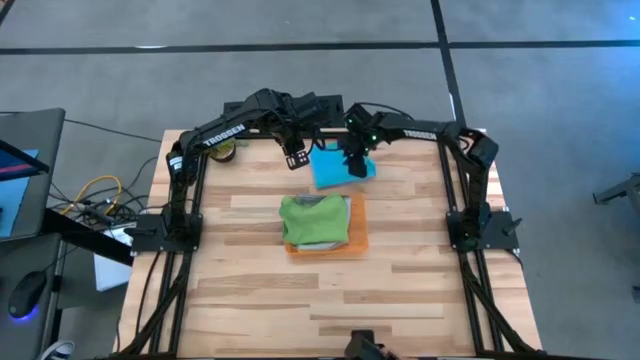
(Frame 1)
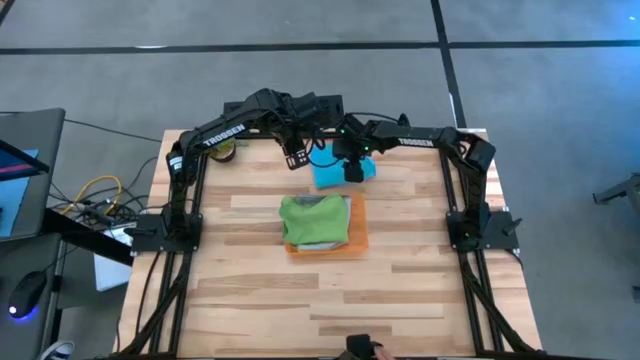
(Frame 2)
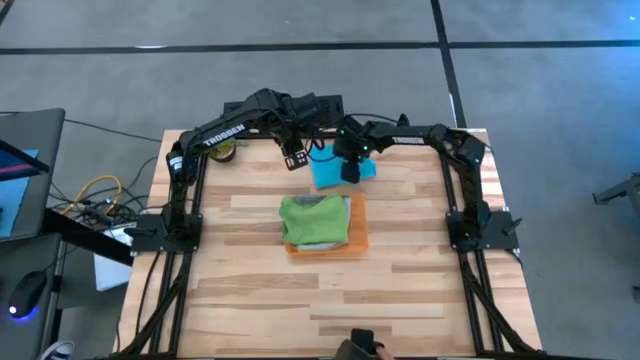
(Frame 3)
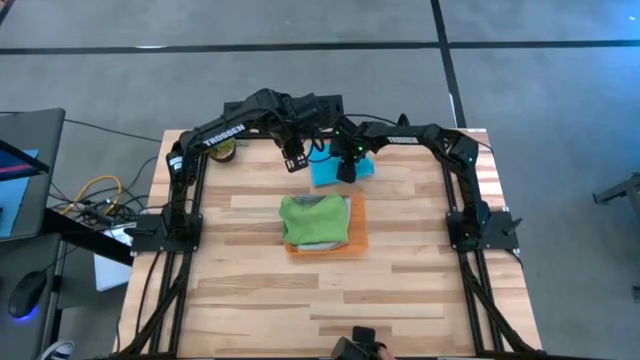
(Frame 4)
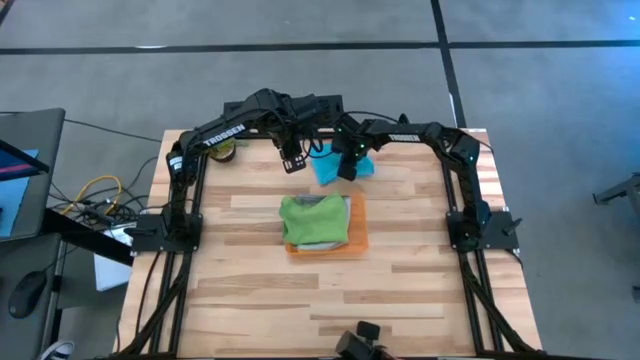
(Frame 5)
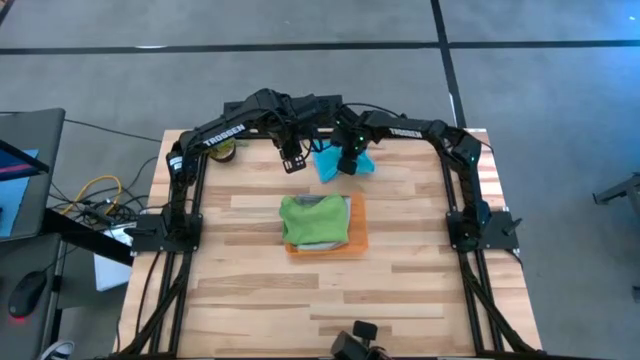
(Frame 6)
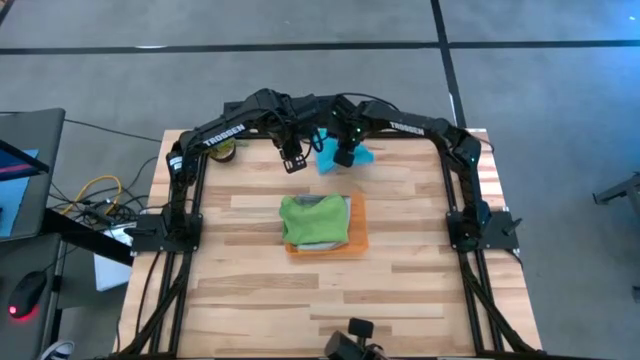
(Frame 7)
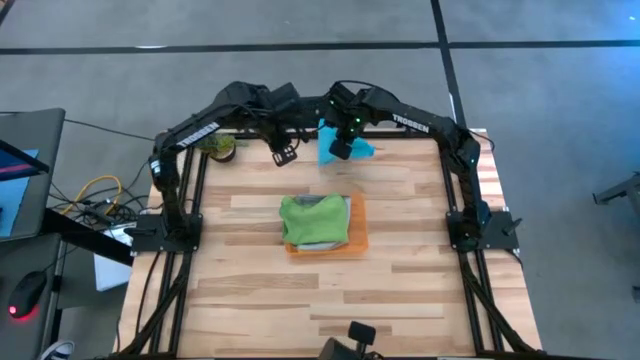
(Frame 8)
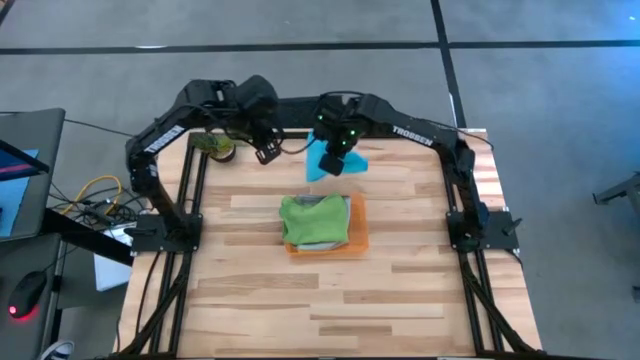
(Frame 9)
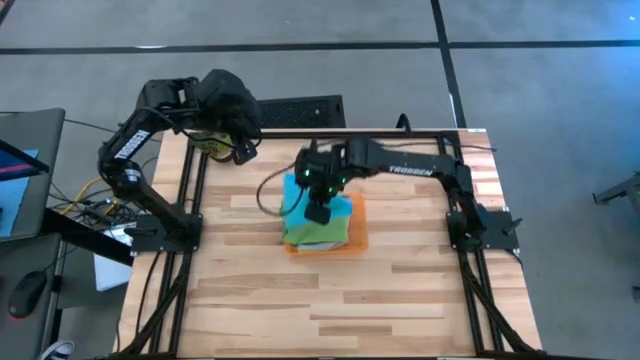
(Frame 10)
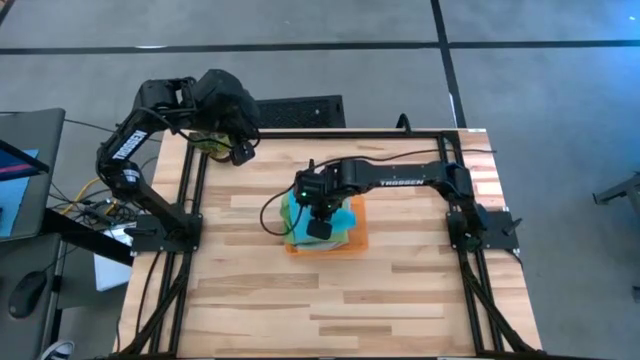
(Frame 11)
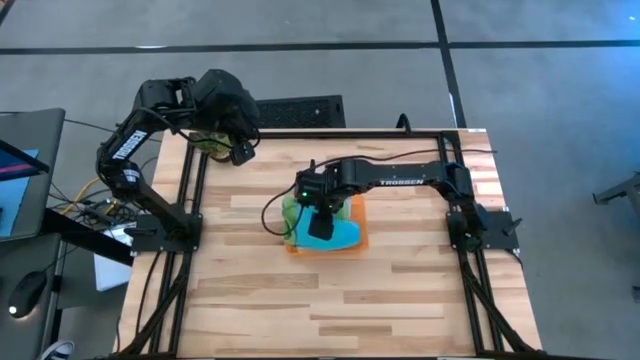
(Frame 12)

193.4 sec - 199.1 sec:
Task: Sort microfiber towel by color & place in baskets
Stack the blue towel on top of the green towel into the orange bin

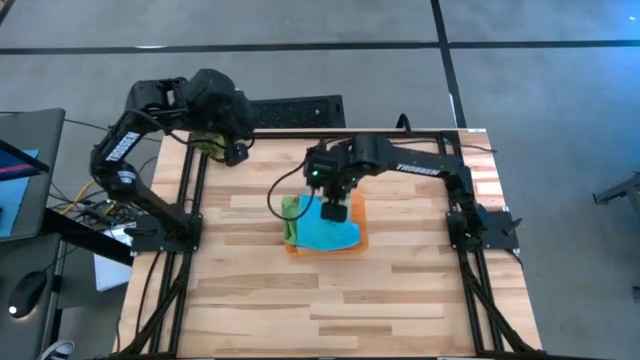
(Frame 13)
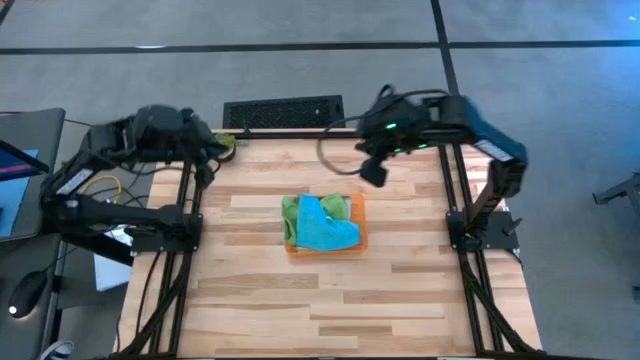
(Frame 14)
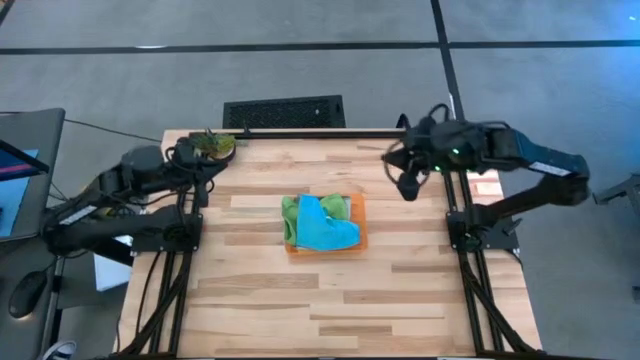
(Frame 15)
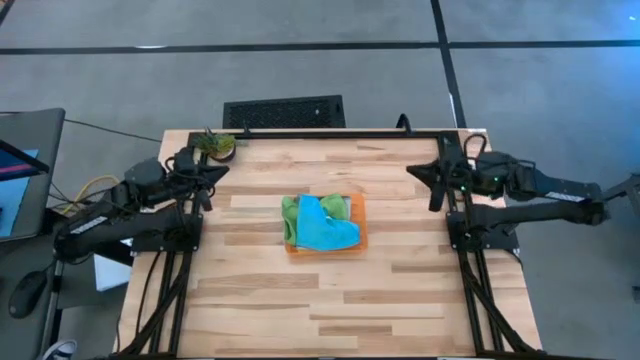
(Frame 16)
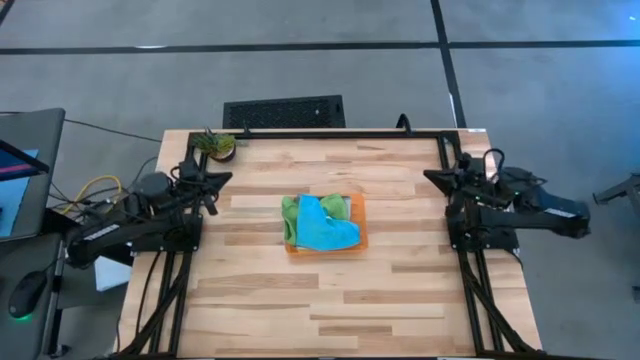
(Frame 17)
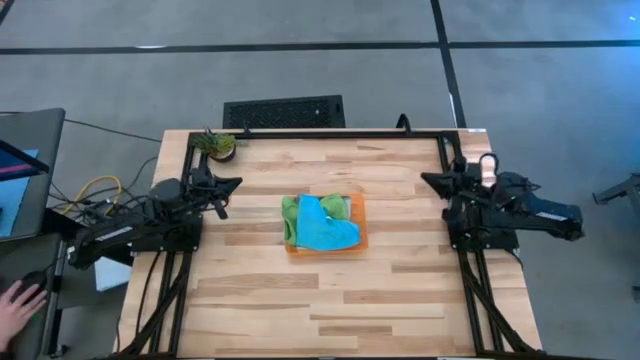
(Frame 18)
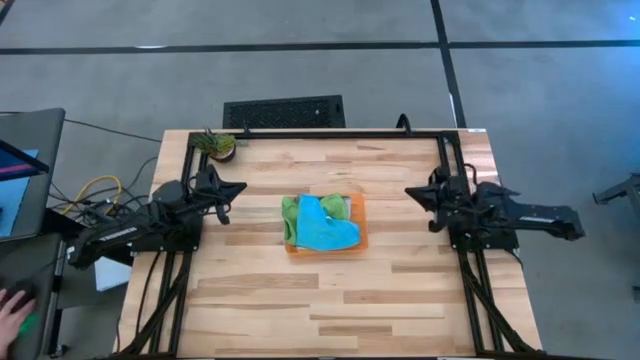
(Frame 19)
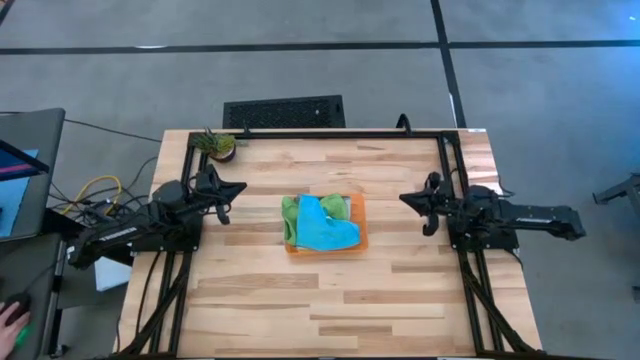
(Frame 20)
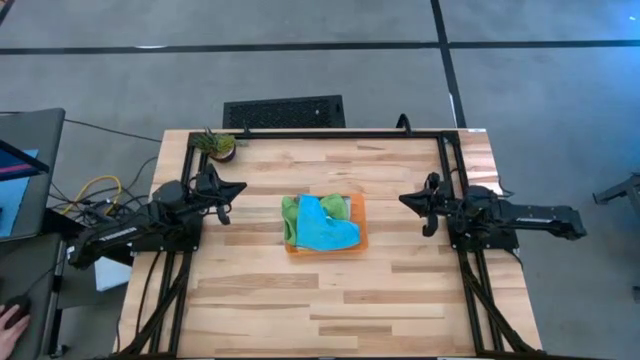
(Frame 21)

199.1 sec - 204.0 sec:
Return to Home Position

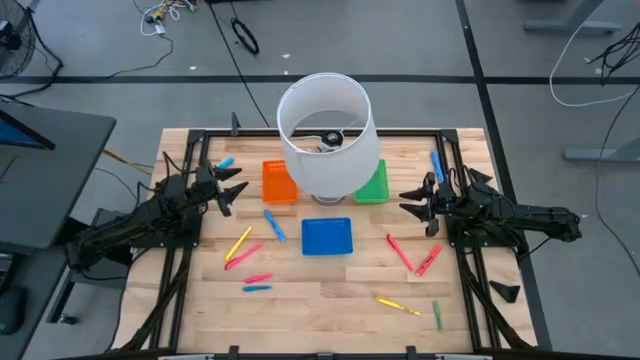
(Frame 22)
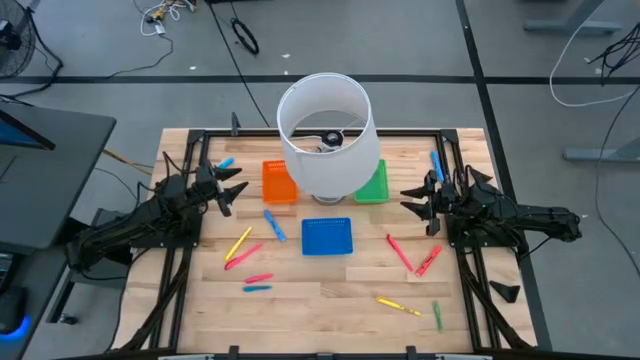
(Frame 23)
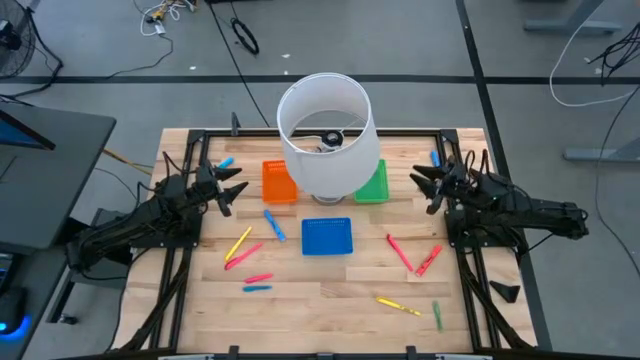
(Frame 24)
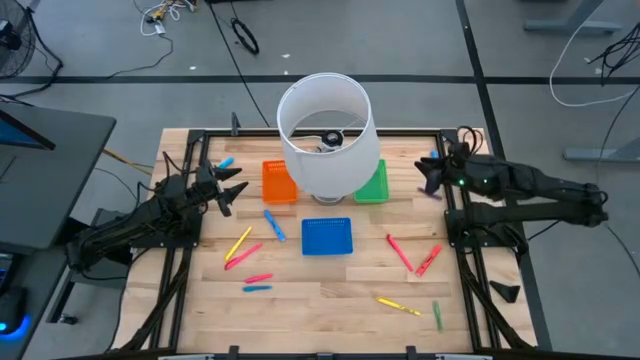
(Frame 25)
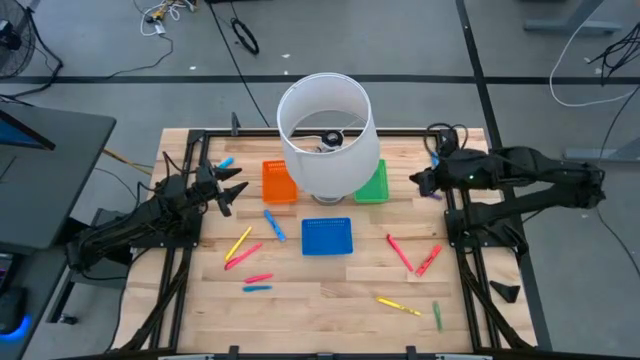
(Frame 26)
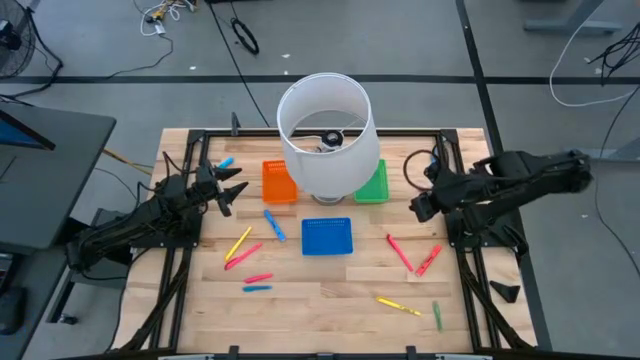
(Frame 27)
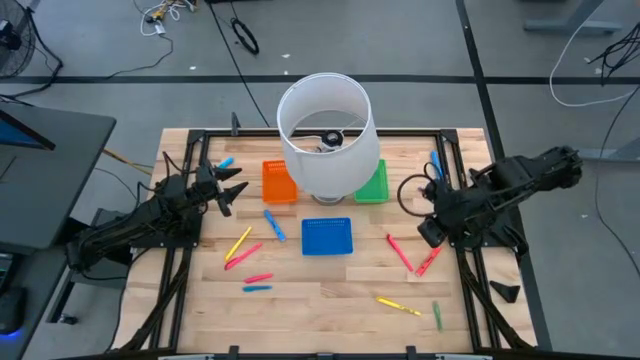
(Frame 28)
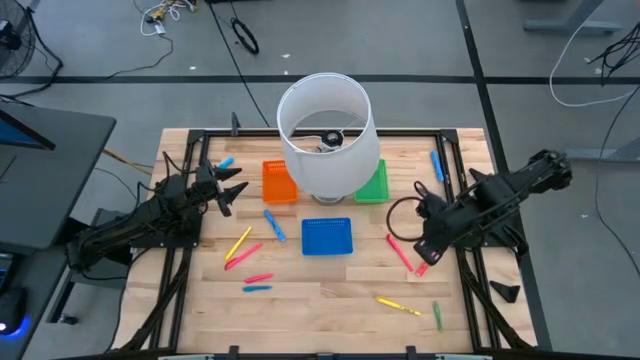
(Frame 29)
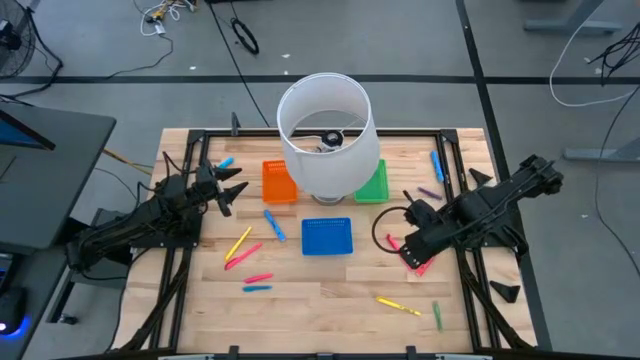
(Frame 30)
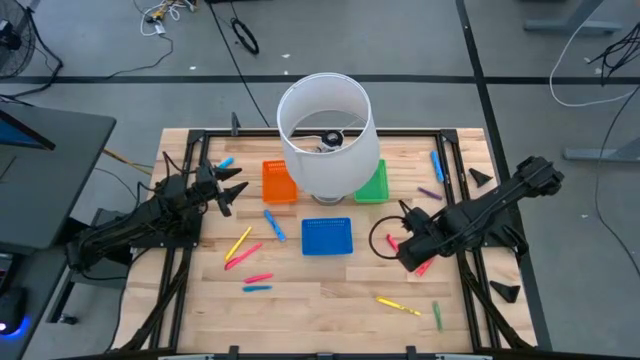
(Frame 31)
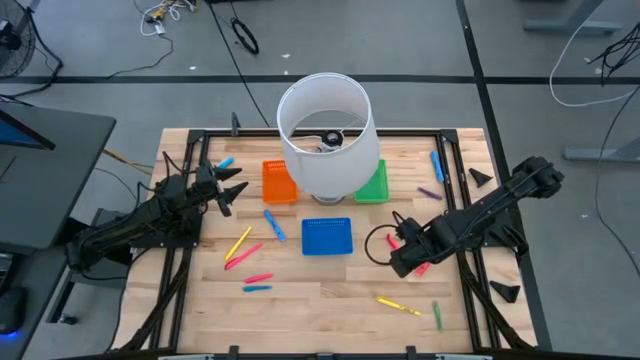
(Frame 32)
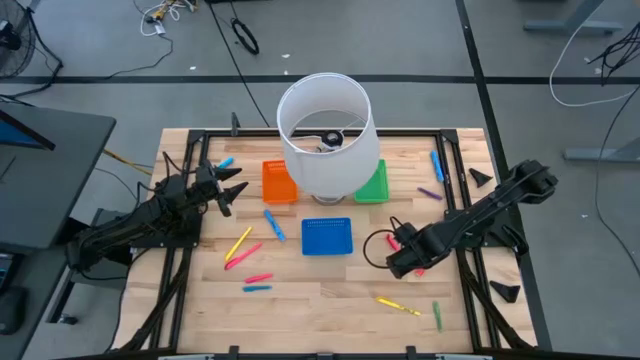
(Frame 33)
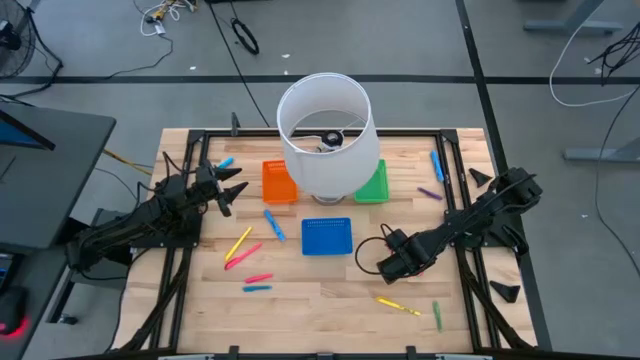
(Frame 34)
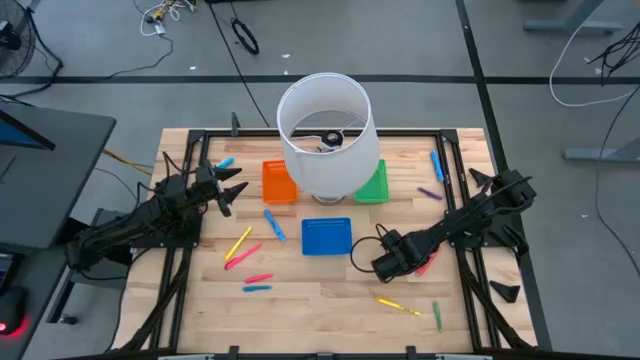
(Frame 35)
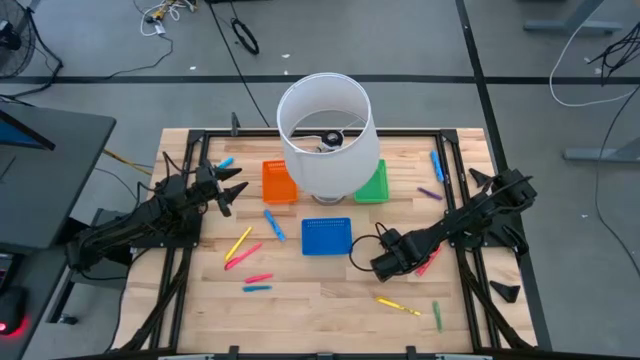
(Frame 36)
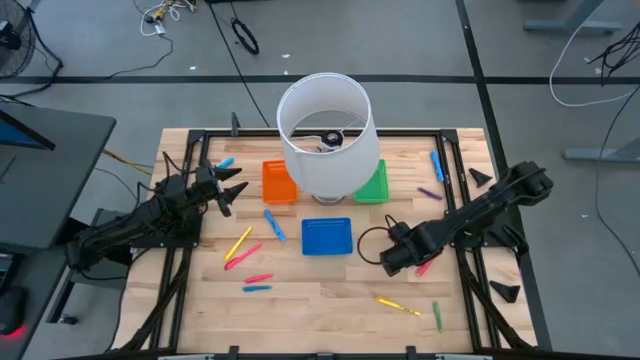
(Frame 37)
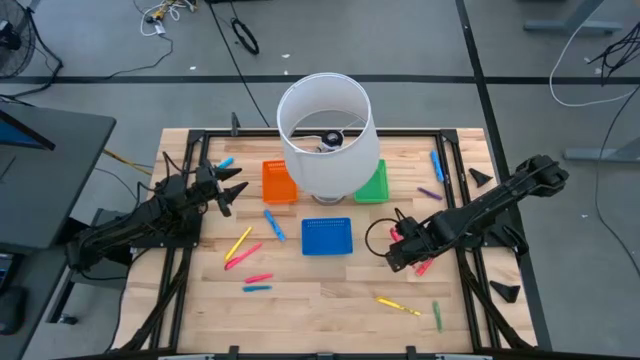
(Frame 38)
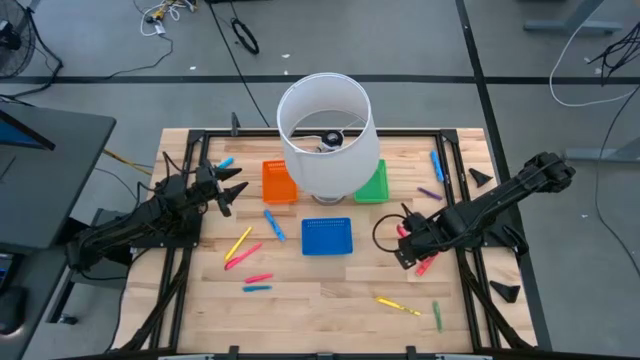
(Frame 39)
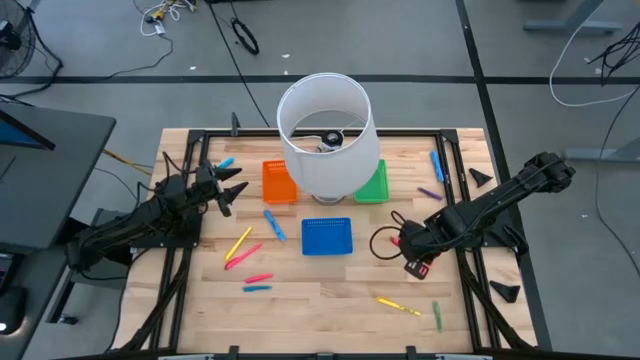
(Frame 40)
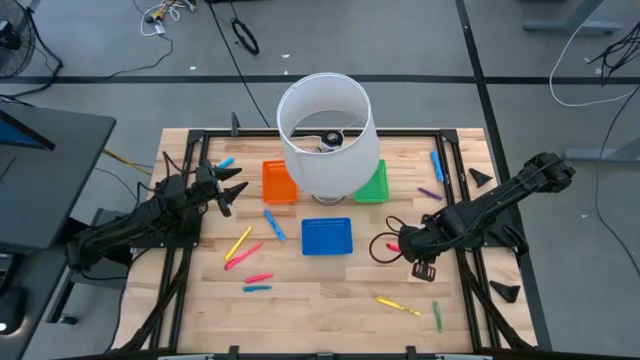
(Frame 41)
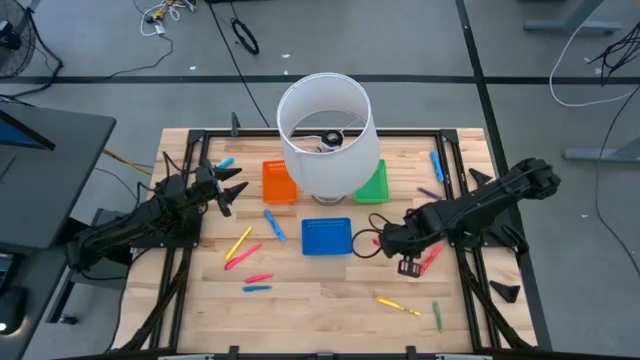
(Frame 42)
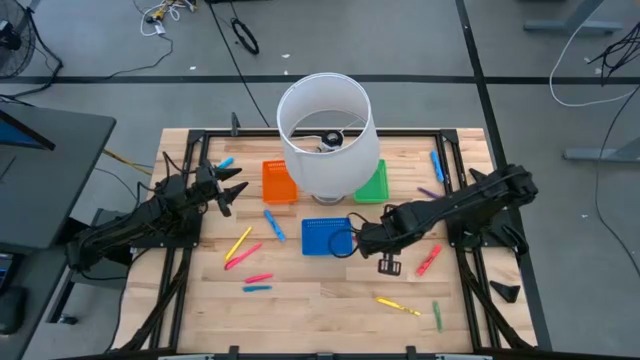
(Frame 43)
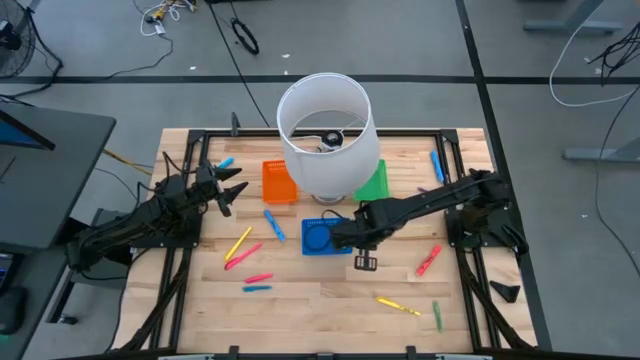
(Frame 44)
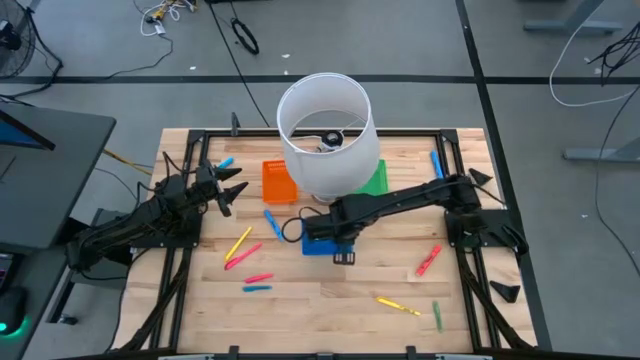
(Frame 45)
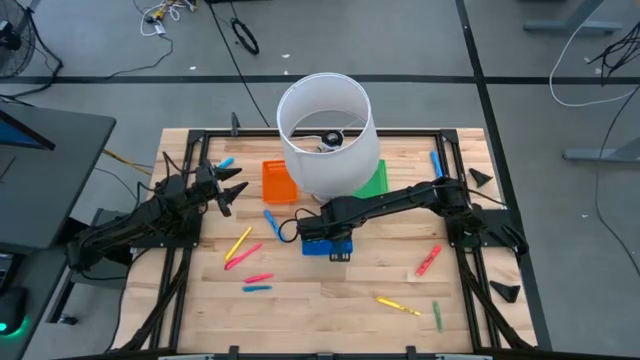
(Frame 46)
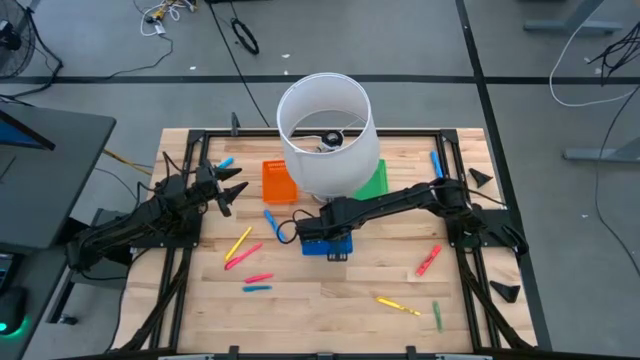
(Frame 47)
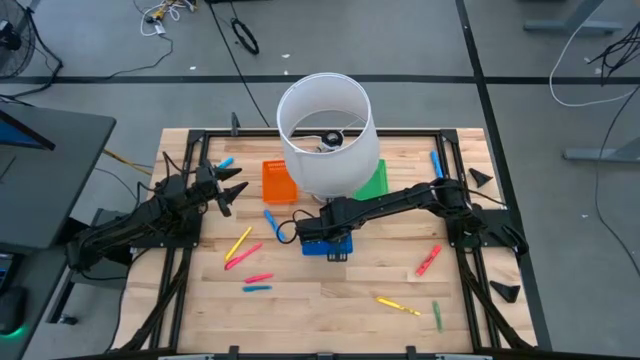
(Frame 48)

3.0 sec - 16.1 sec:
Task: Pick & Place Markers
Put the right pink pen into the blue bin
